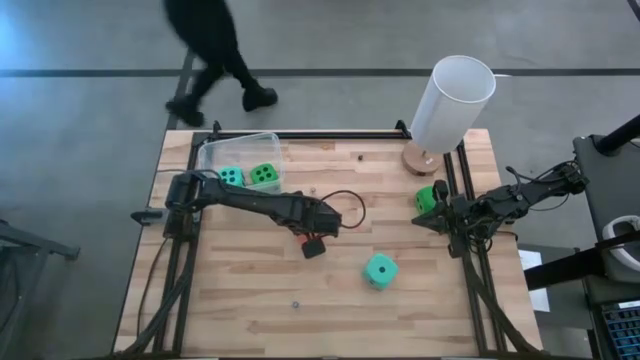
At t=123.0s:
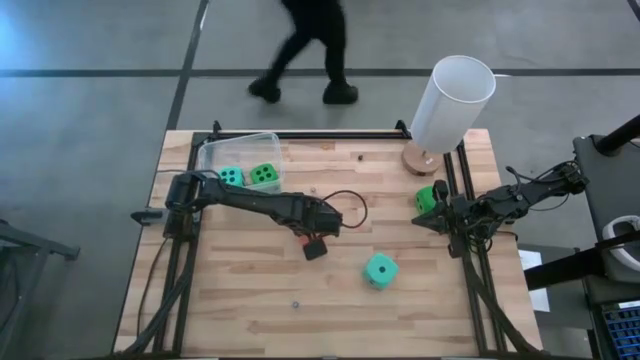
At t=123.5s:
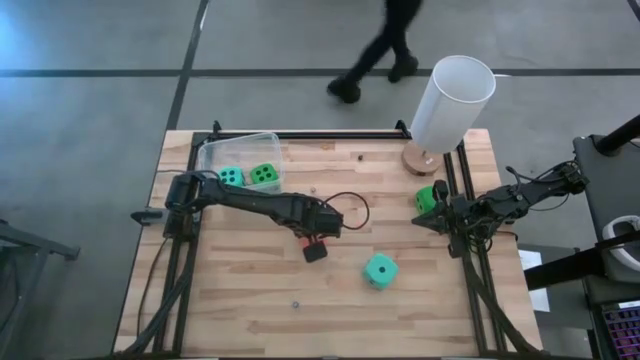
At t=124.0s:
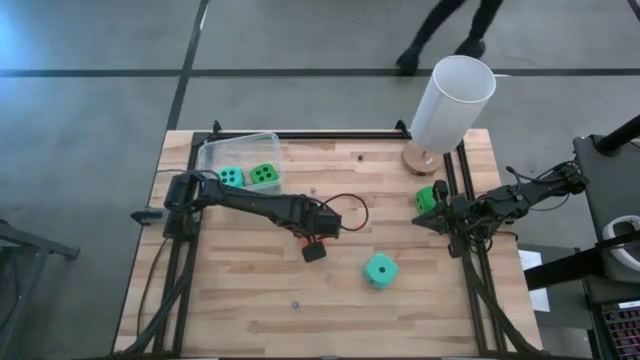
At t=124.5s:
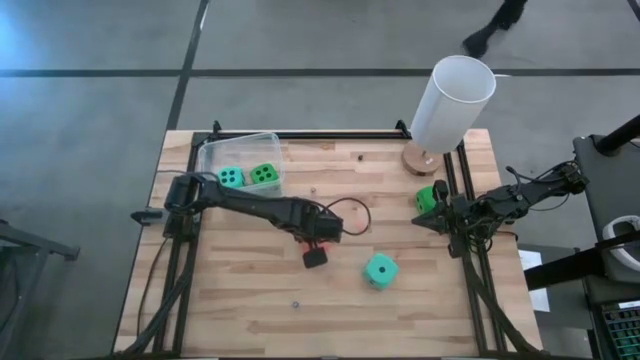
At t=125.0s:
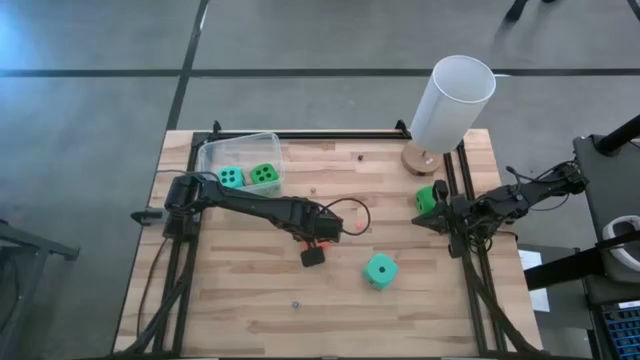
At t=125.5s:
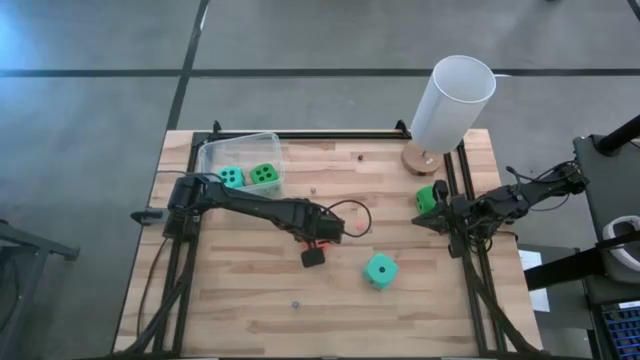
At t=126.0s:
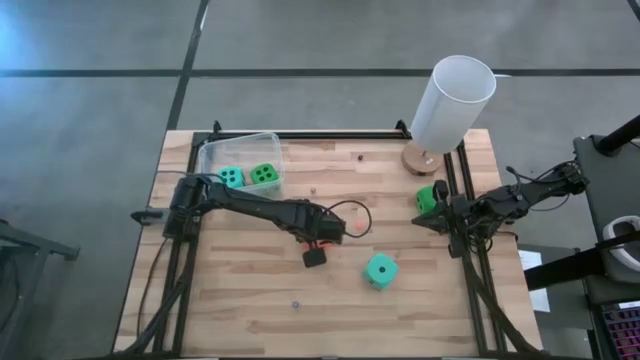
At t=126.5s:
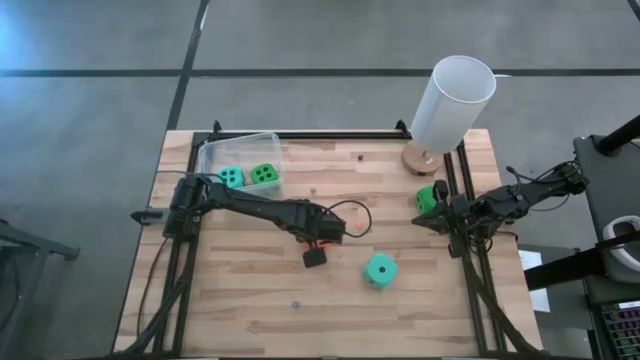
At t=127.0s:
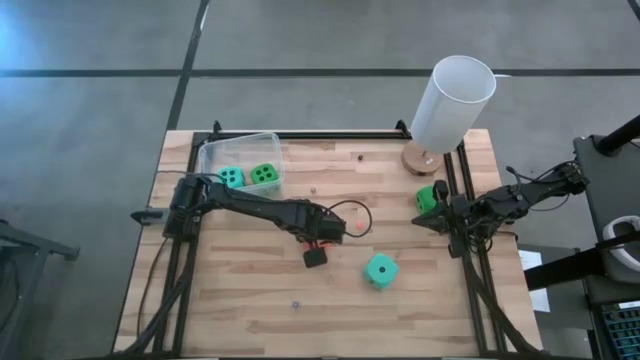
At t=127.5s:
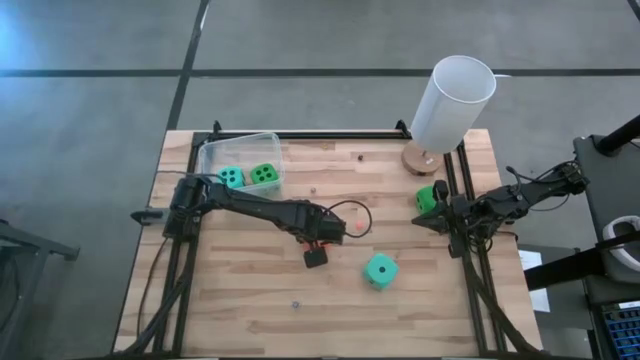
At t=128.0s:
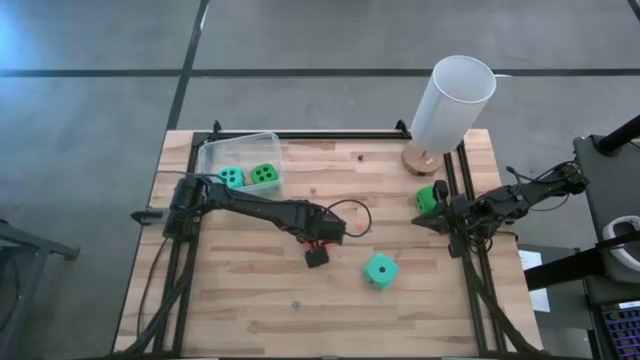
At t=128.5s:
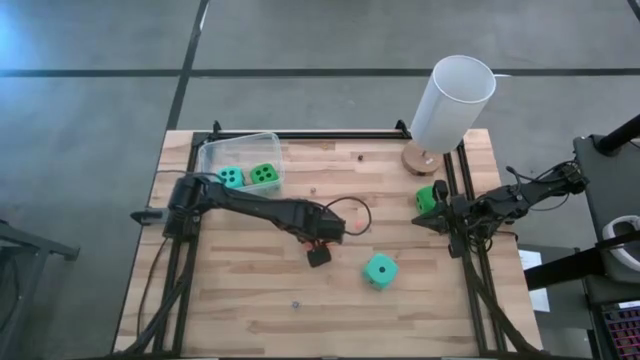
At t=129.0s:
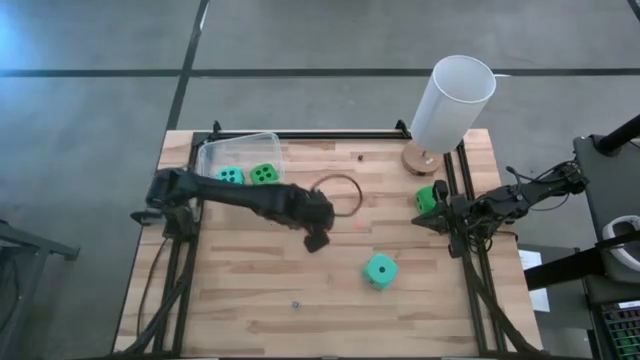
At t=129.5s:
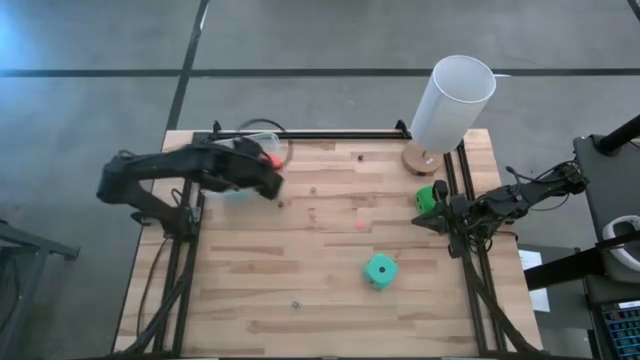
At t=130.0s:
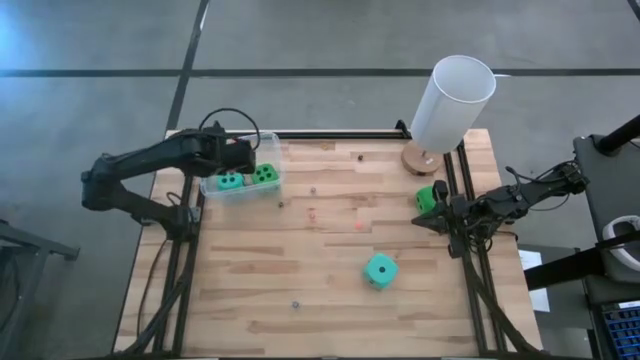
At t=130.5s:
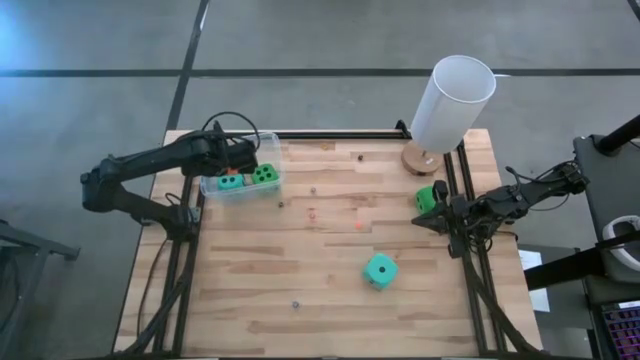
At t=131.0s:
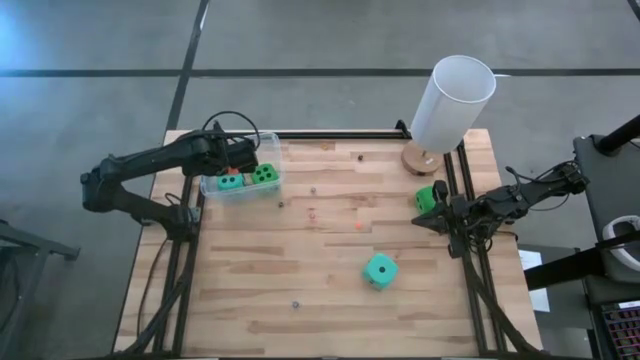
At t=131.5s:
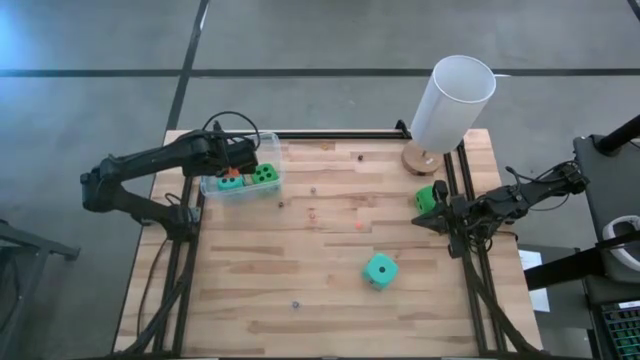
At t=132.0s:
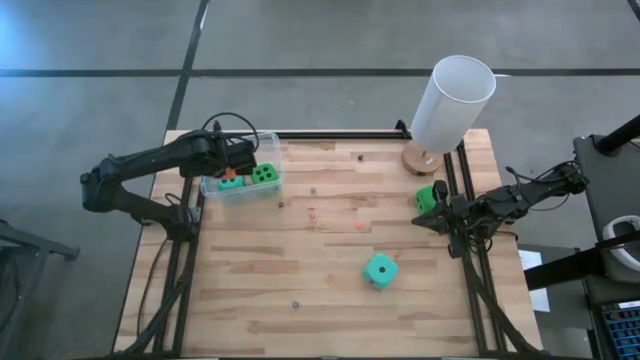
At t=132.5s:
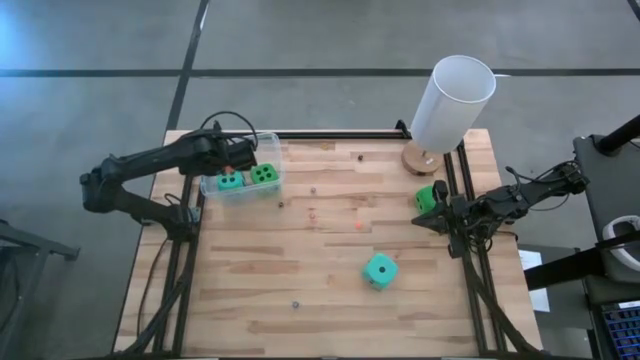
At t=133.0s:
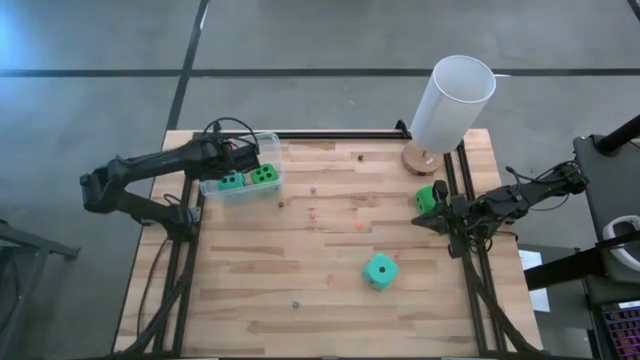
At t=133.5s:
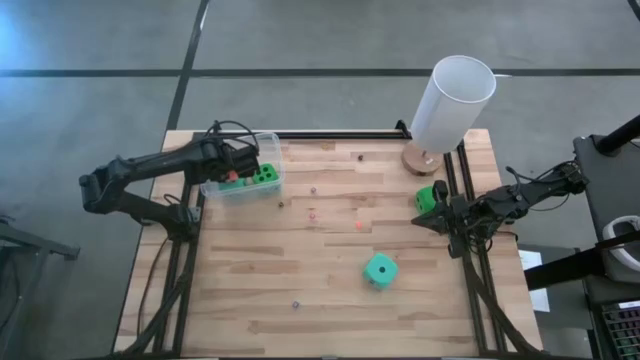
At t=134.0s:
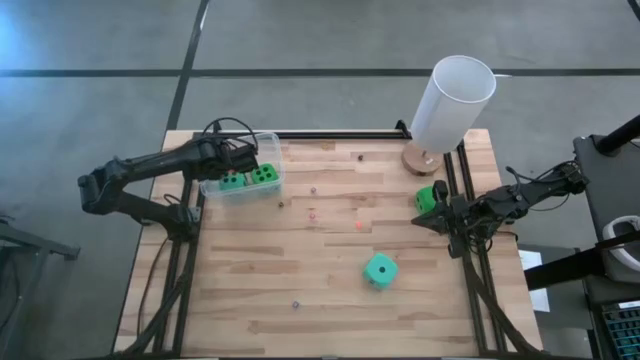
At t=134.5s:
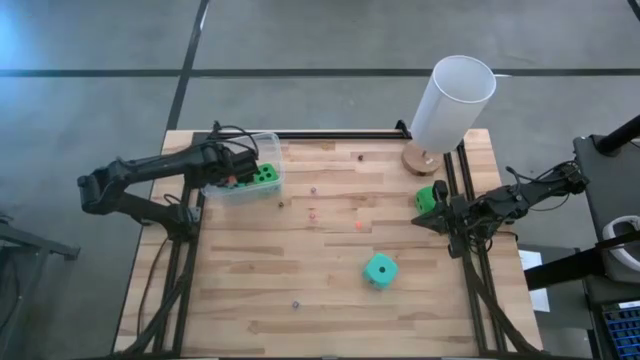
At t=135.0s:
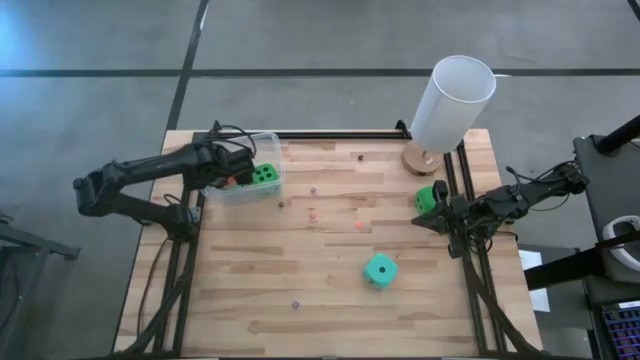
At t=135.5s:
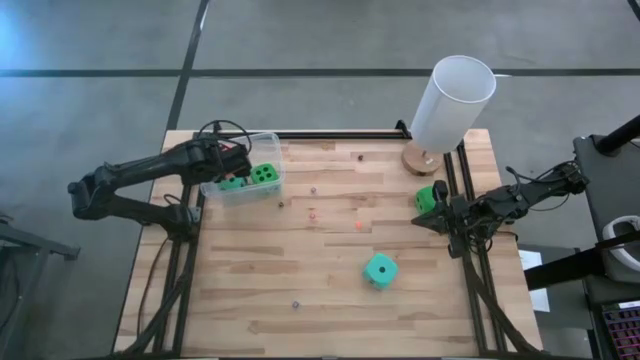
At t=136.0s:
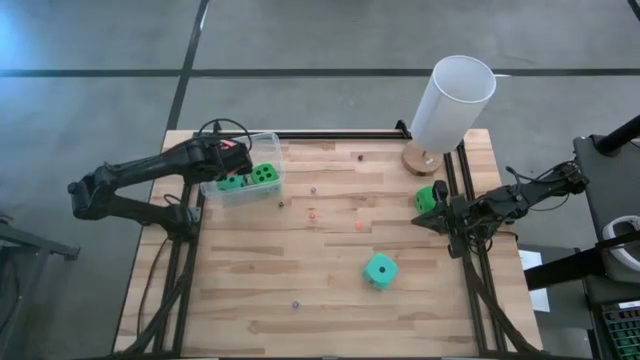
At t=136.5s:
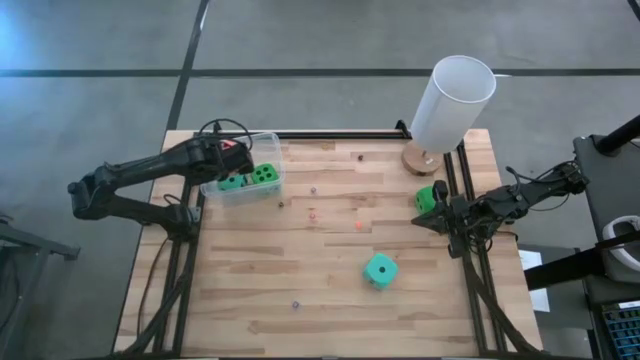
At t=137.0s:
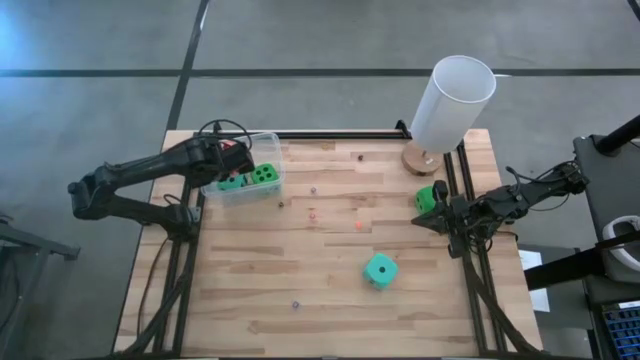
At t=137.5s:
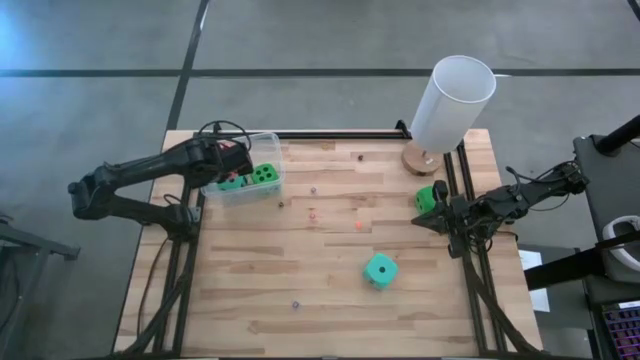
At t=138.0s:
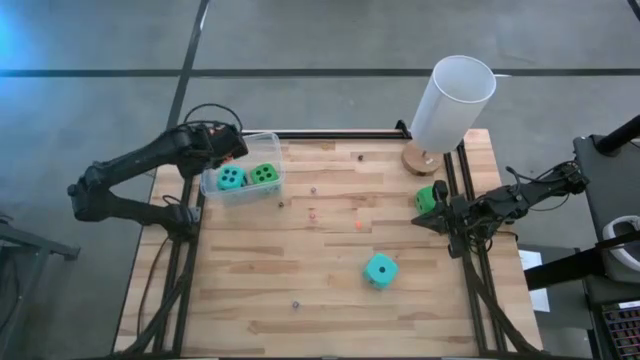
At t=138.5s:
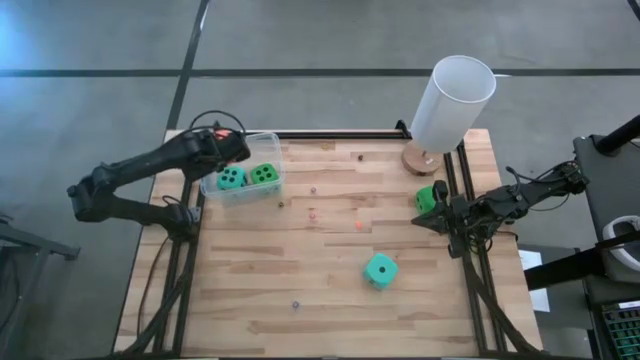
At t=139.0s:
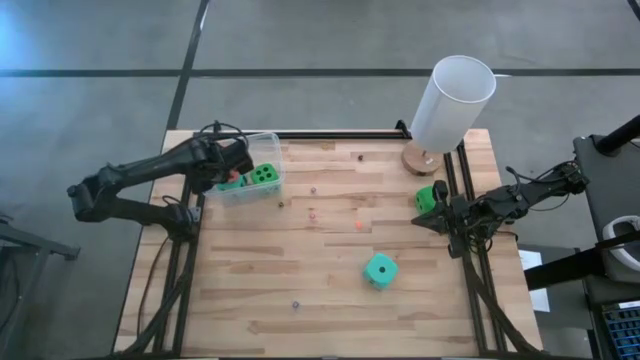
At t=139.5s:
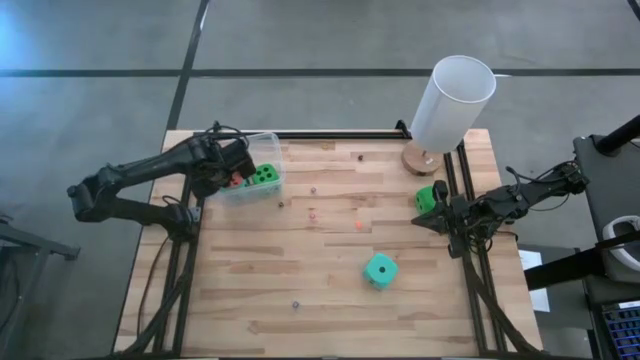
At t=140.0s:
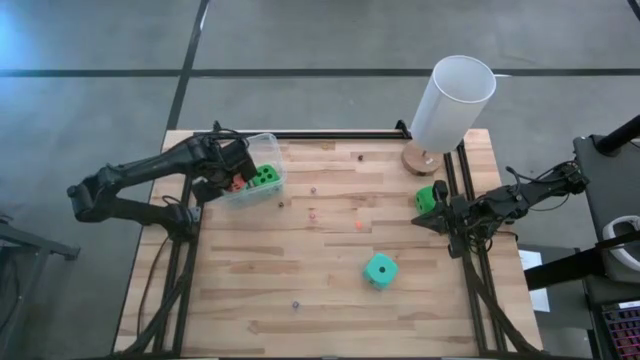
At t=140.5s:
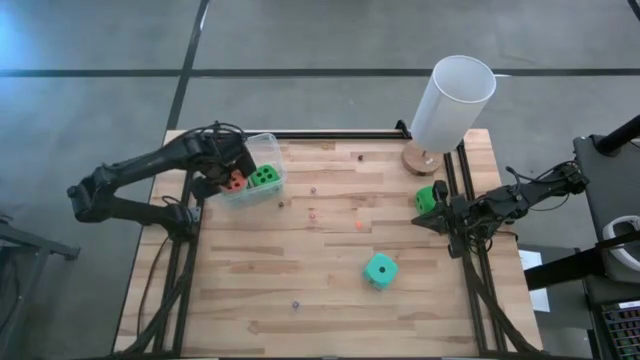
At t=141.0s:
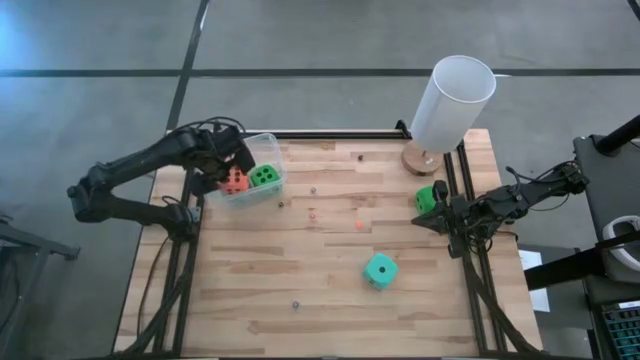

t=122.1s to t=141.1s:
Task: Pick & Place Dice
Put the orange large dice into the transparent bin

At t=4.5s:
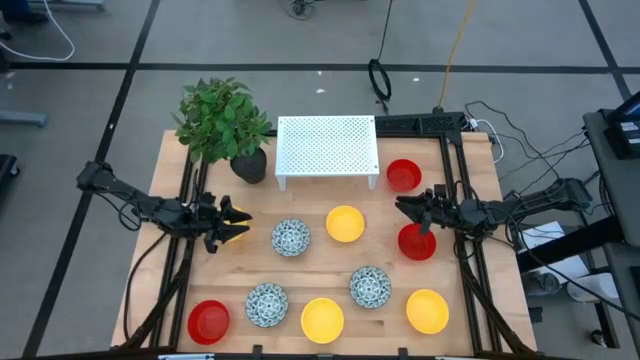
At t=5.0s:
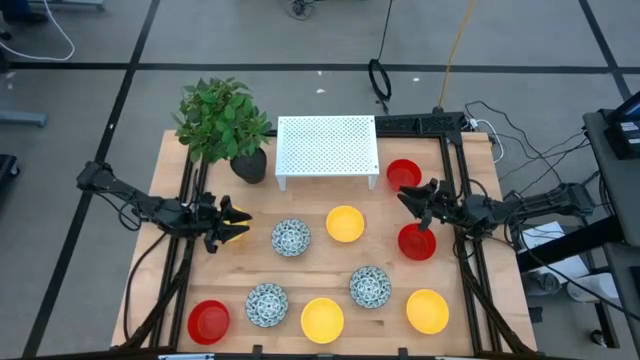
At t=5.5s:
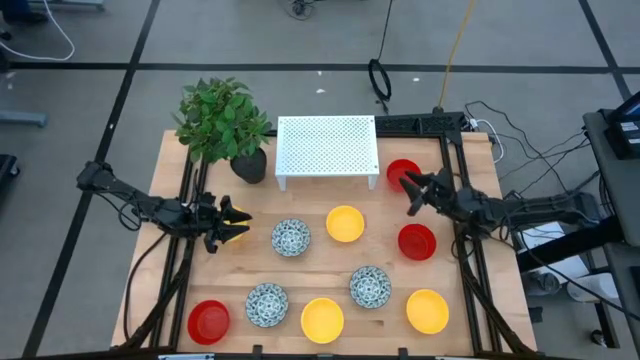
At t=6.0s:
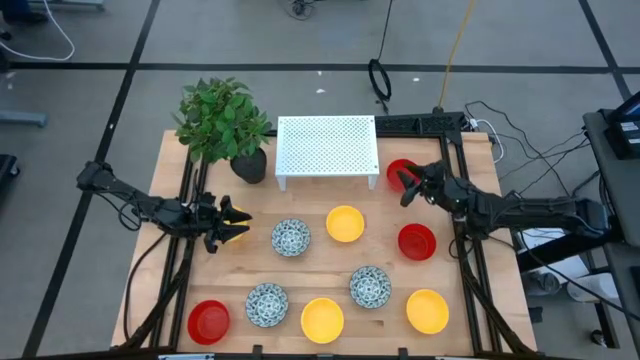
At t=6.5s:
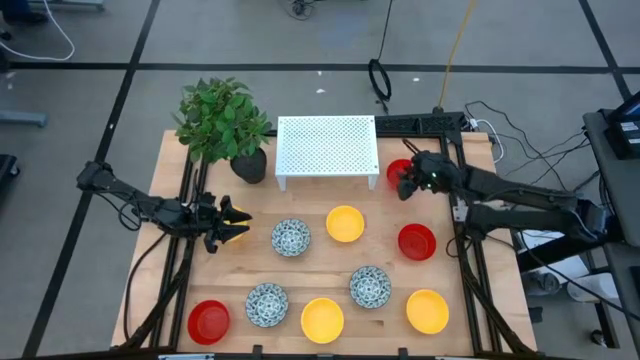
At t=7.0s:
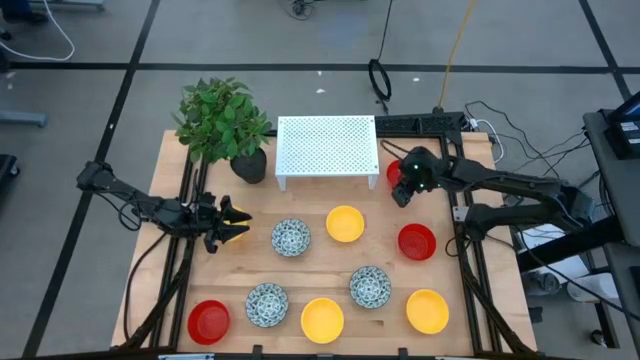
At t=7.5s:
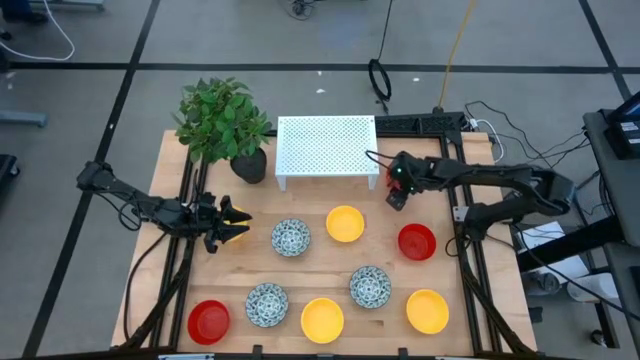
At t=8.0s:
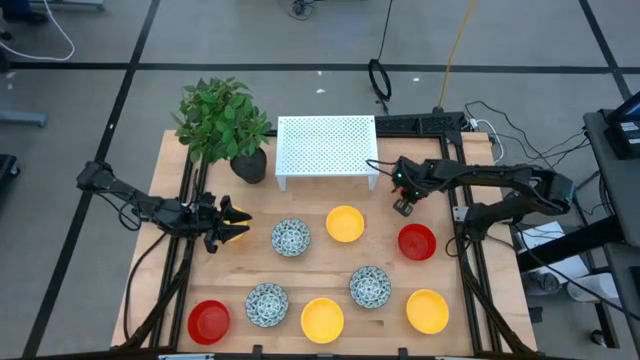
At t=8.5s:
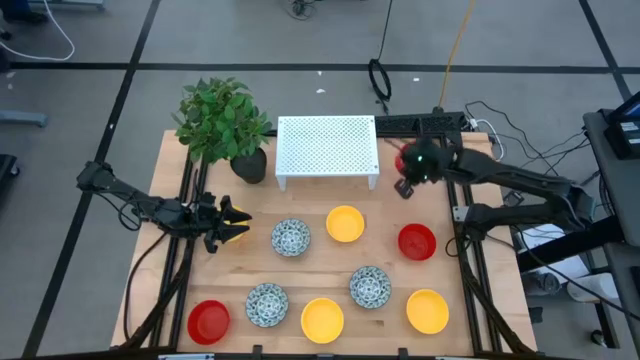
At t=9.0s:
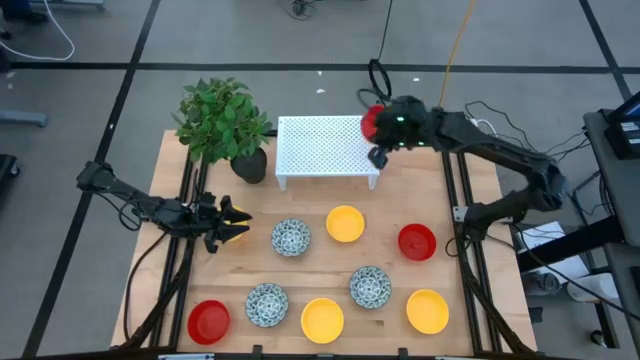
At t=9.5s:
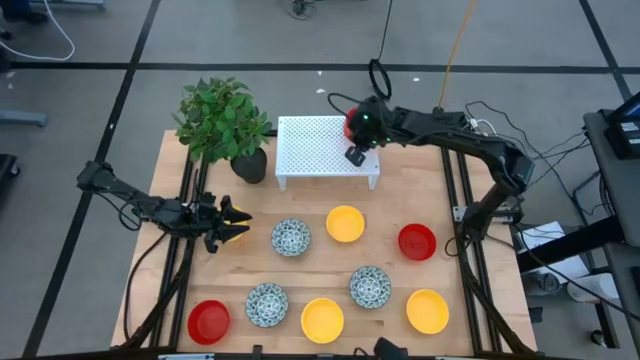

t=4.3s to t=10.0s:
Task: Pick & Place Mini bowls
Put the red bowl on the shelf
